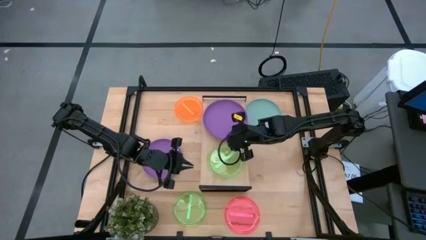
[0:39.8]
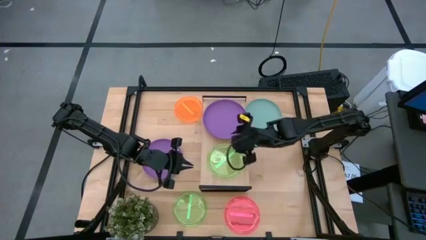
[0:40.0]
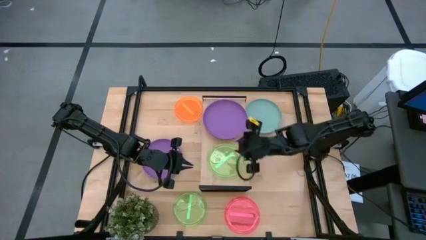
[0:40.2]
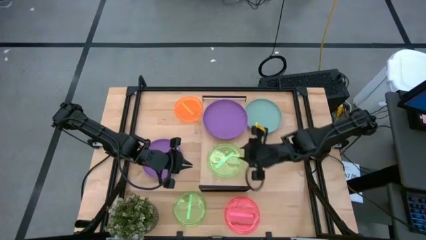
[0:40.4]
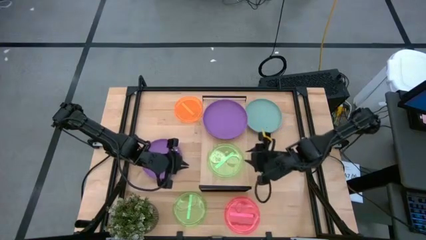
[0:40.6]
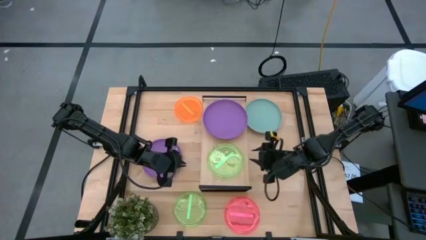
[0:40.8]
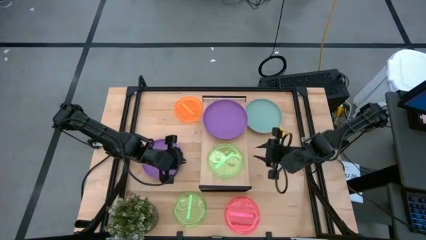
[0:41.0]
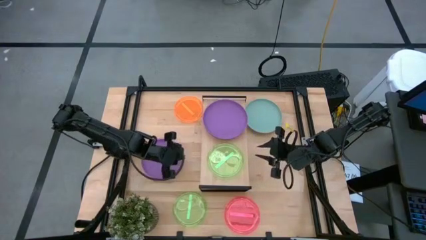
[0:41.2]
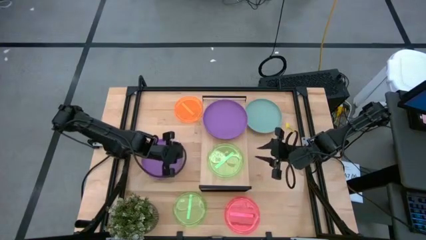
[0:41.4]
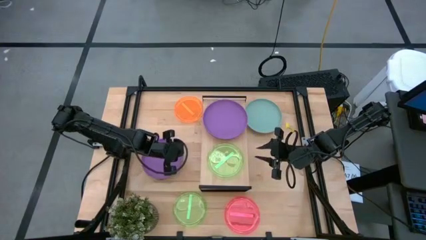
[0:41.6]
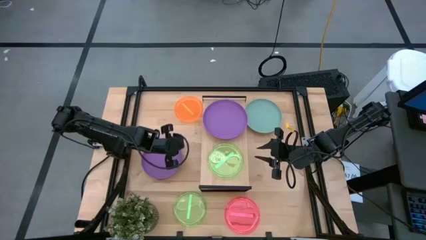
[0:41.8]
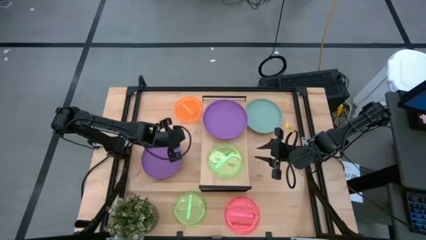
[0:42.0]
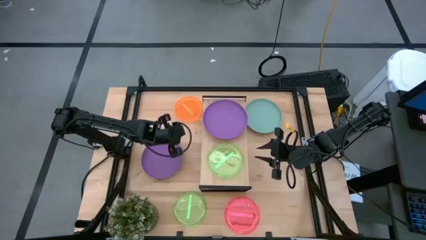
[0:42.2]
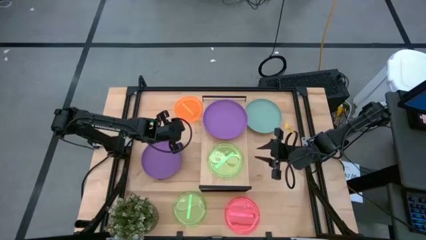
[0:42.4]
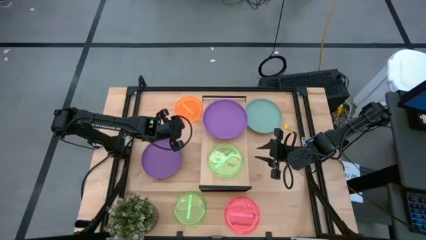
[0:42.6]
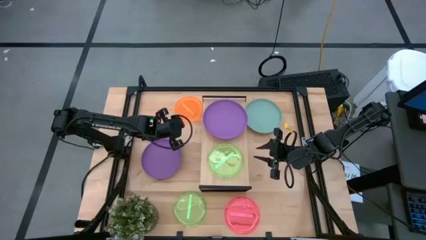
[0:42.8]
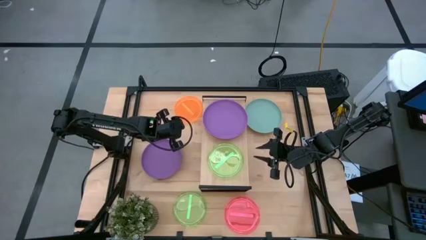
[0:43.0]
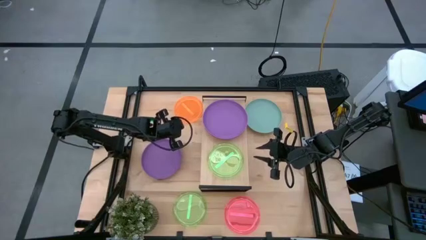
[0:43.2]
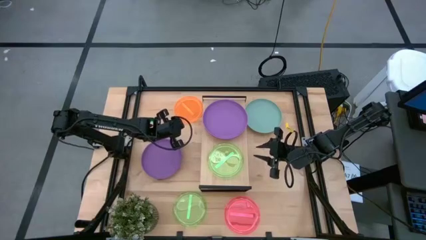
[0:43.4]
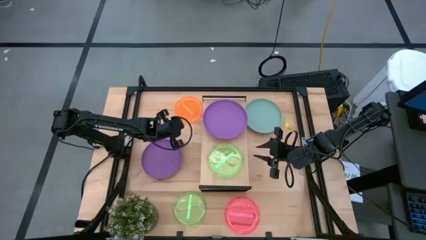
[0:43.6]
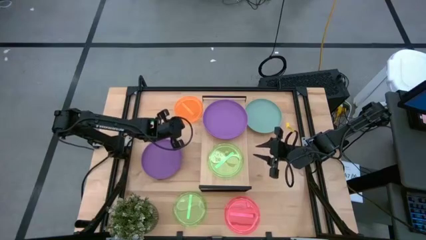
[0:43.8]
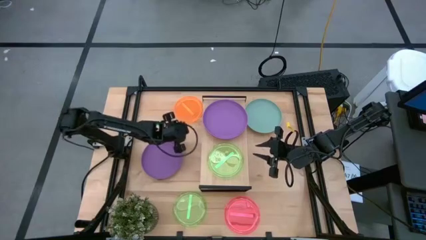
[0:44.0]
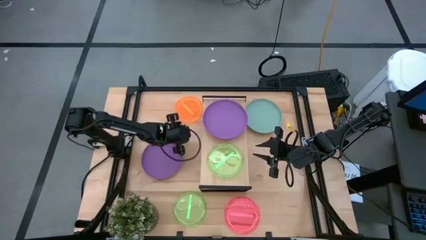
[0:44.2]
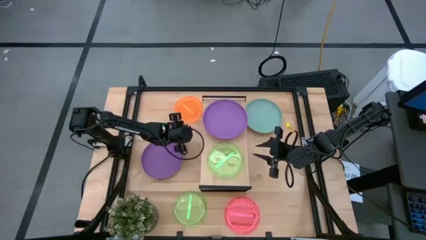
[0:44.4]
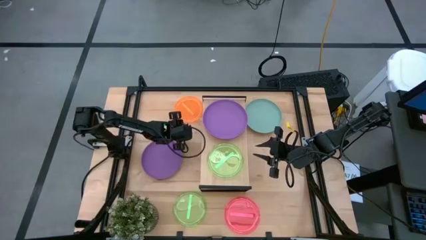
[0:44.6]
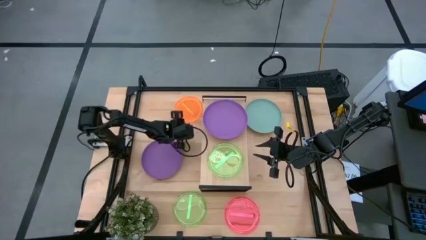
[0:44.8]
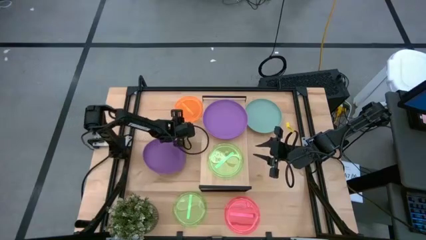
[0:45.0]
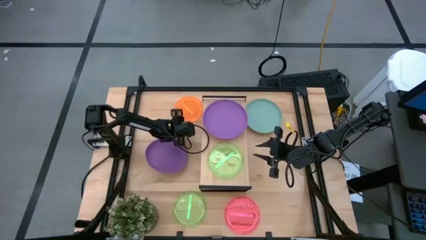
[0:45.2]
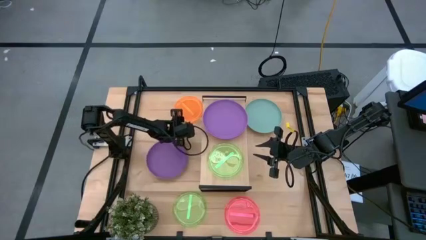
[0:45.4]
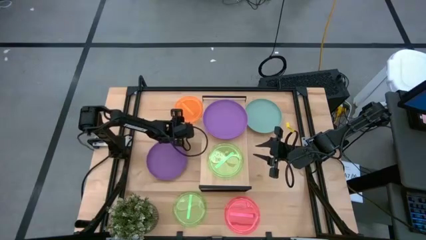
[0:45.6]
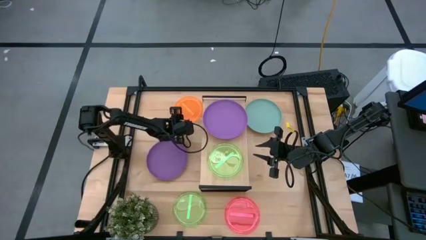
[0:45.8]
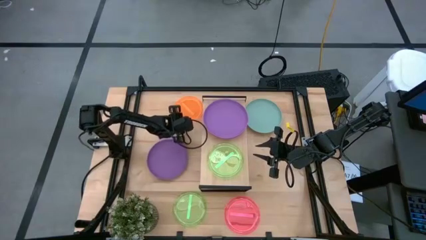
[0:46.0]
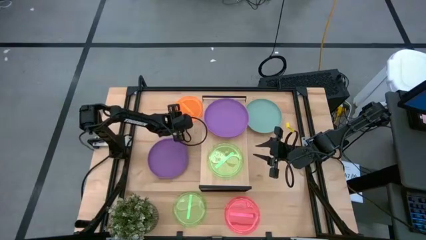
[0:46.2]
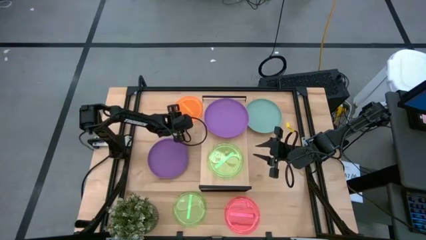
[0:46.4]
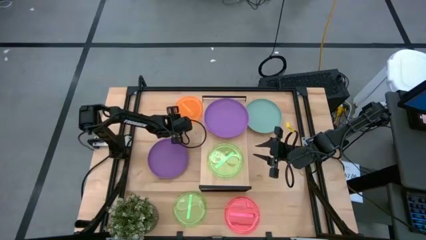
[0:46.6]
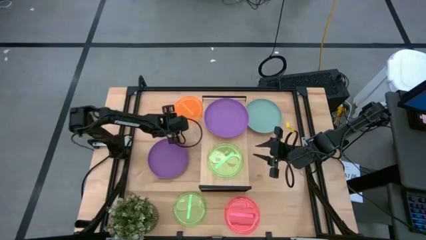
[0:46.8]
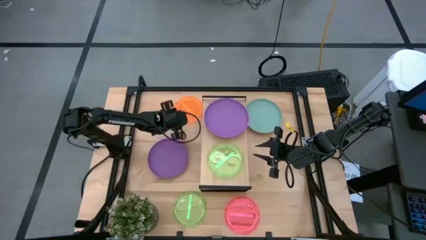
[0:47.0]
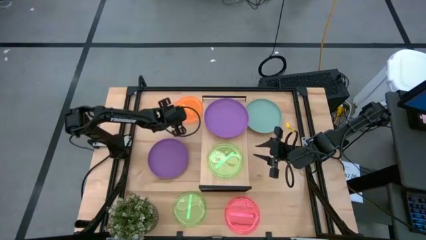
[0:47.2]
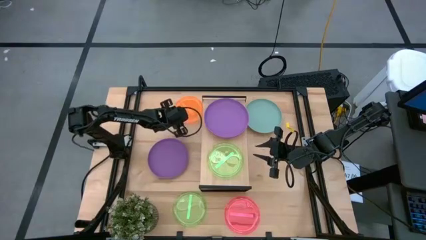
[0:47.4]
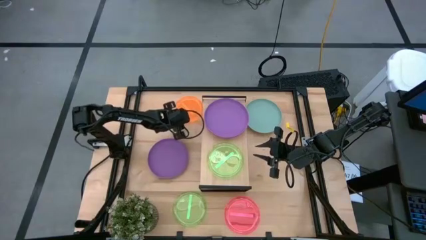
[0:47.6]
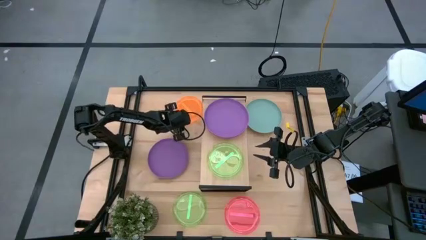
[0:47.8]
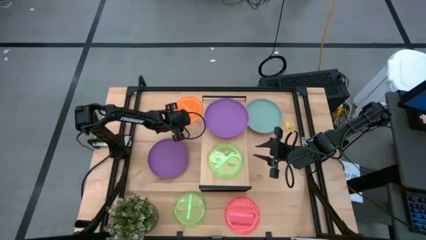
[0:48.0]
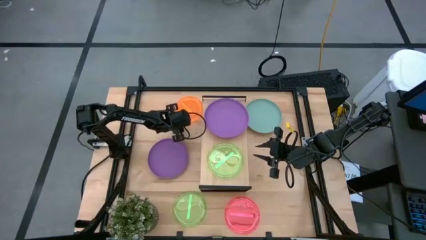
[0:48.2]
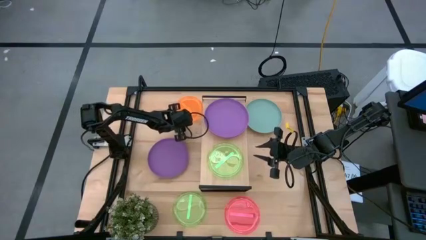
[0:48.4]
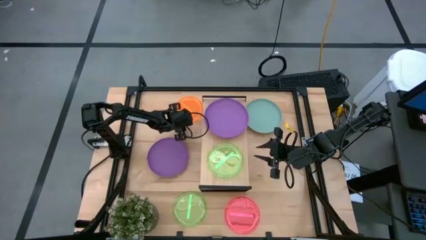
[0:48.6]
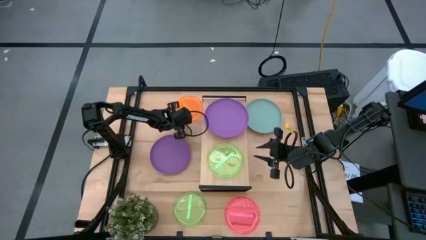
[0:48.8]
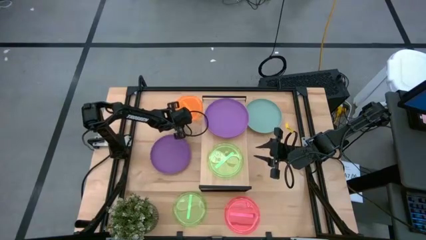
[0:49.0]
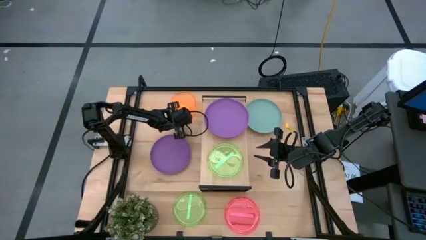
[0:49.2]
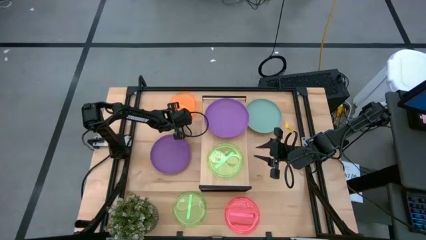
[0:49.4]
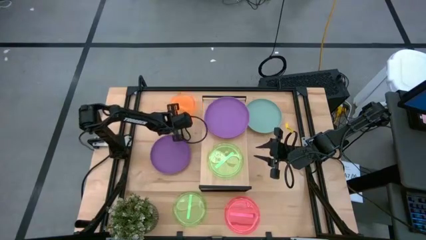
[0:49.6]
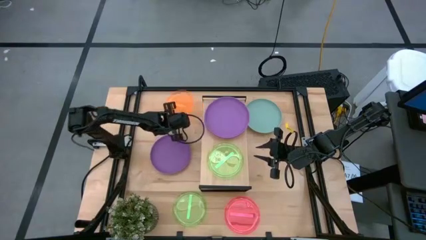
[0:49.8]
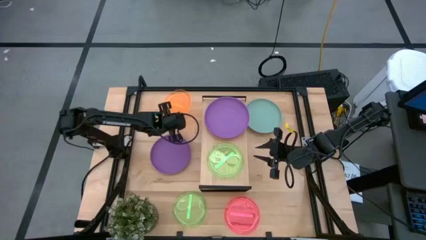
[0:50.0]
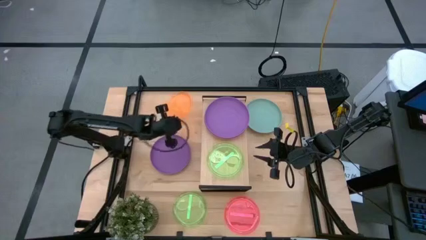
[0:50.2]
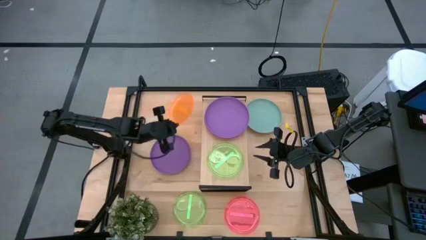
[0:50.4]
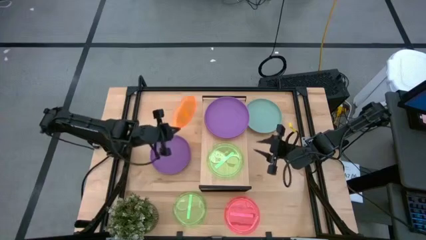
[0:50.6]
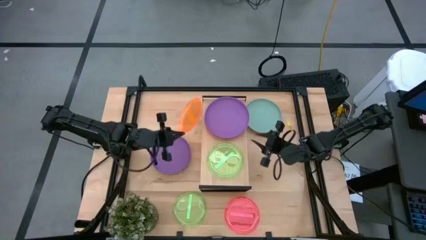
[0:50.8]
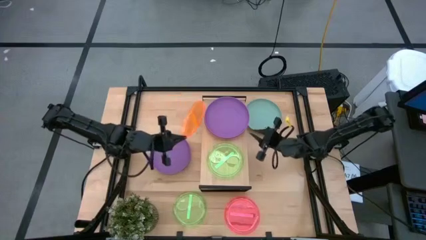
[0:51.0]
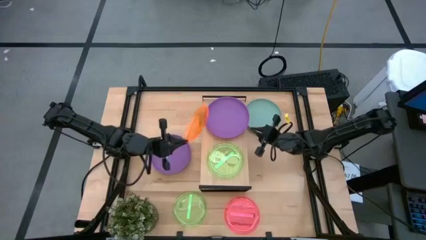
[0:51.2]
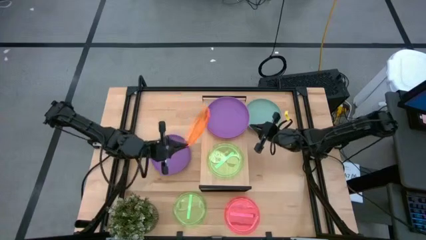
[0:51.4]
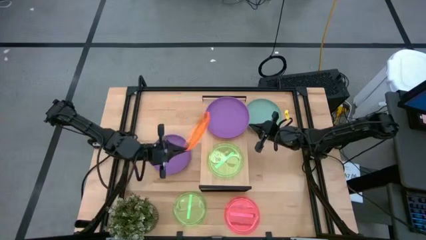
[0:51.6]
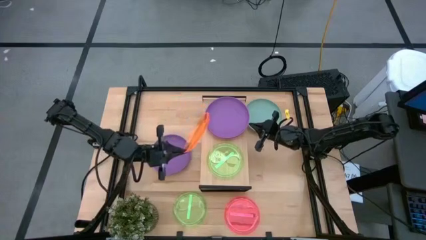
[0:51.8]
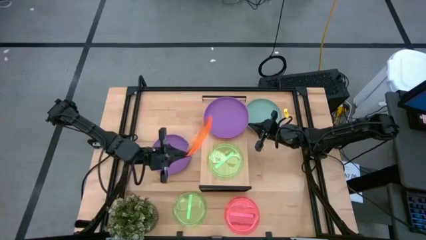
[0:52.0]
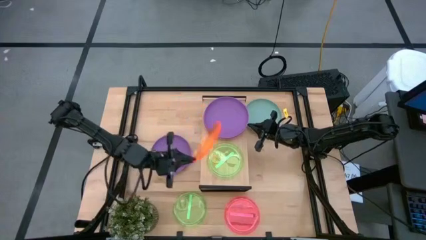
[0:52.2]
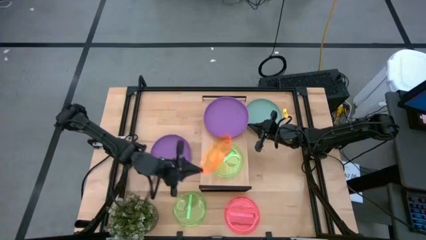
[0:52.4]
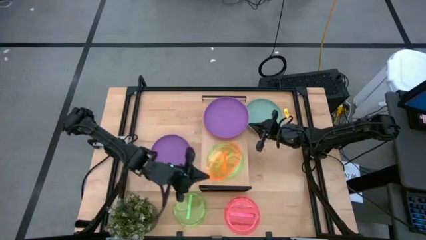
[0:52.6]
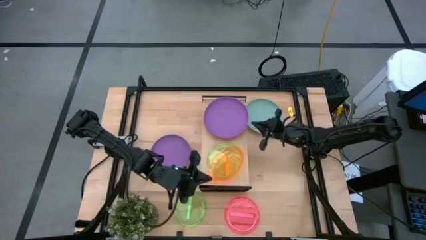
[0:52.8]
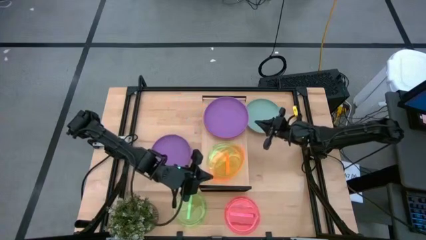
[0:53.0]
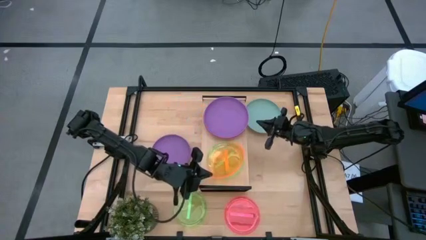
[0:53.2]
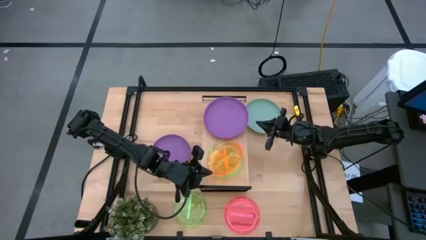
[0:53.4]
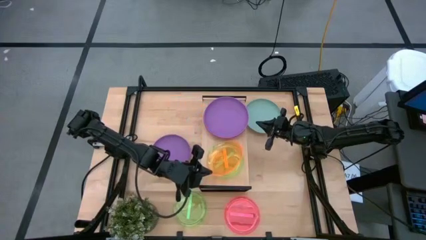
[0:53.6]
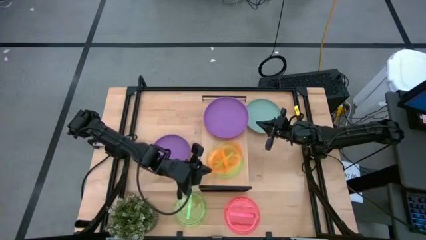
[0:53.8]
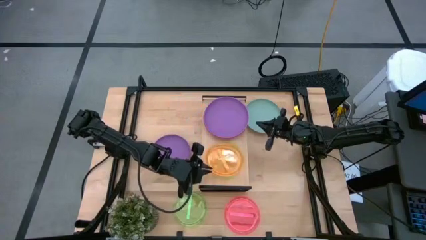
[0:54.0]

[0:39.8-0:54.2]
Task: Place and stack plates onto a shelf
Stack the transparent orange plate on top of the transparent green plate on the shelf
